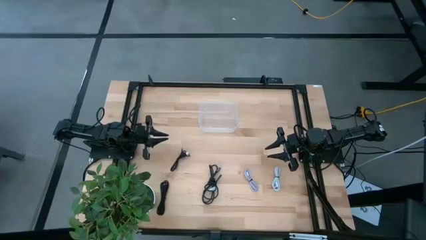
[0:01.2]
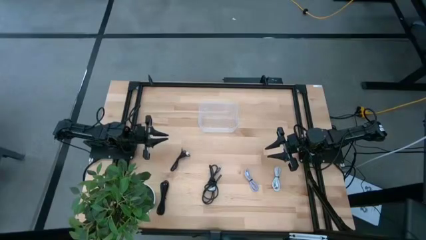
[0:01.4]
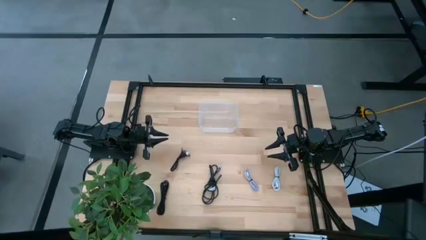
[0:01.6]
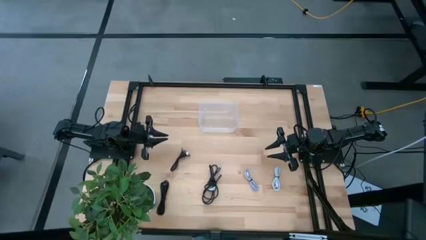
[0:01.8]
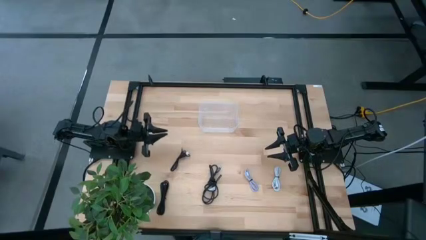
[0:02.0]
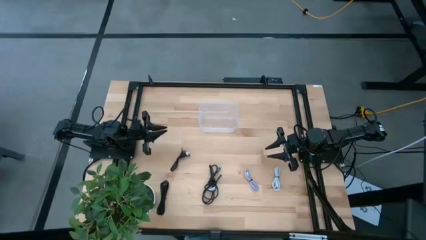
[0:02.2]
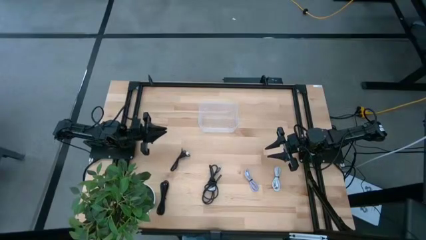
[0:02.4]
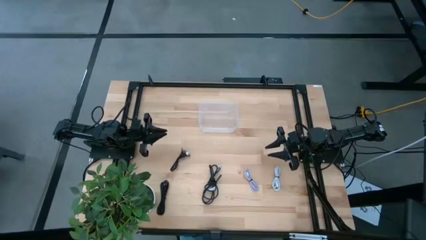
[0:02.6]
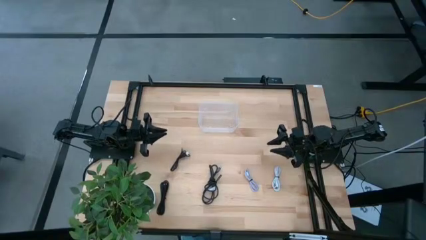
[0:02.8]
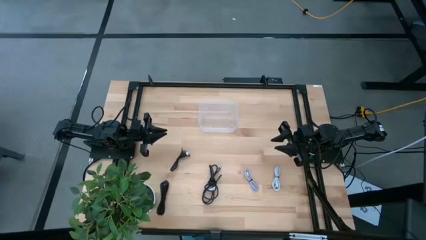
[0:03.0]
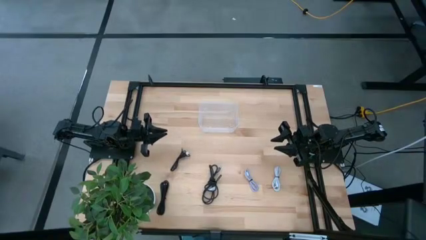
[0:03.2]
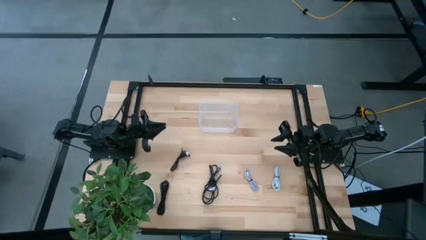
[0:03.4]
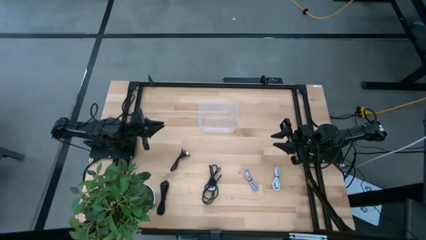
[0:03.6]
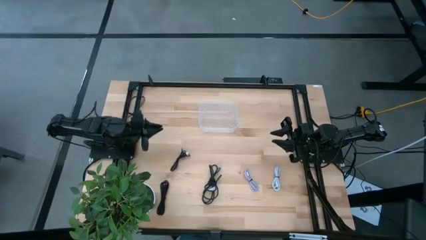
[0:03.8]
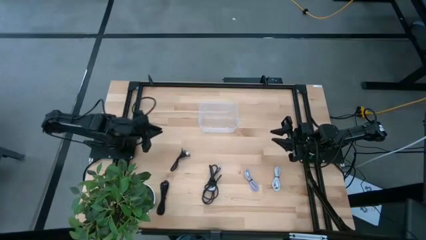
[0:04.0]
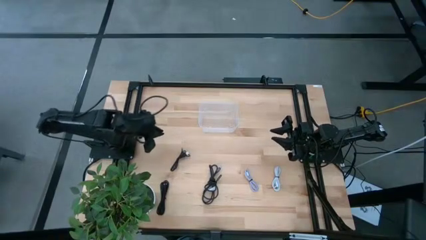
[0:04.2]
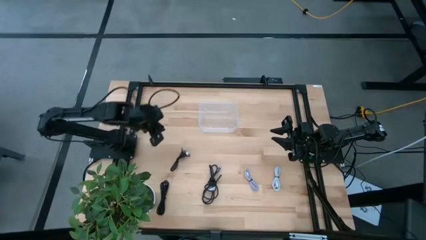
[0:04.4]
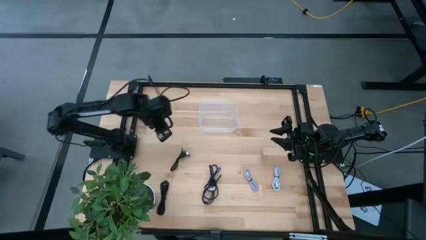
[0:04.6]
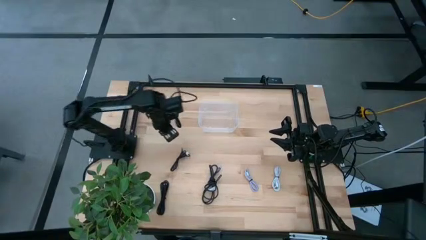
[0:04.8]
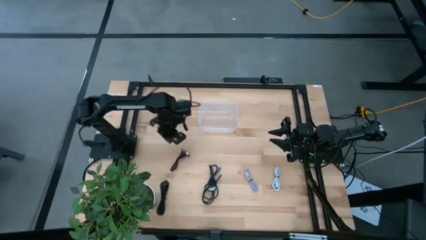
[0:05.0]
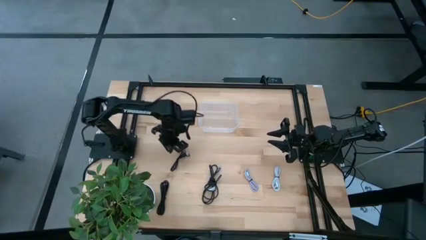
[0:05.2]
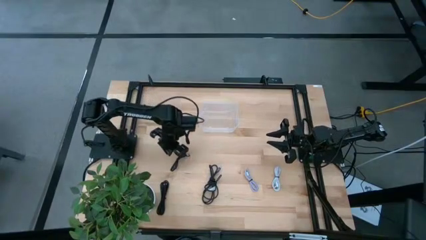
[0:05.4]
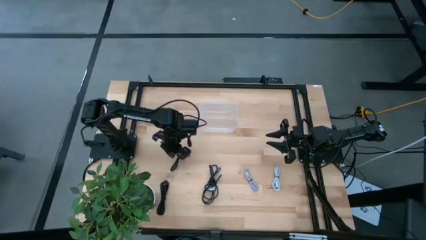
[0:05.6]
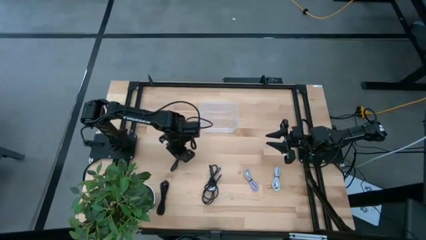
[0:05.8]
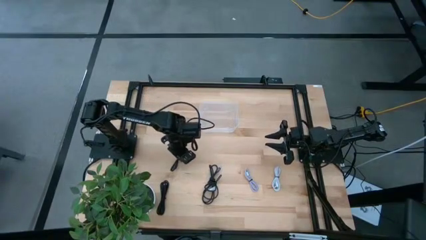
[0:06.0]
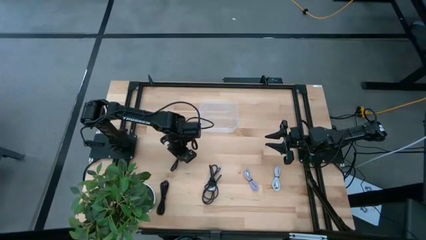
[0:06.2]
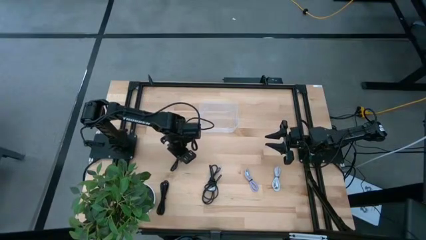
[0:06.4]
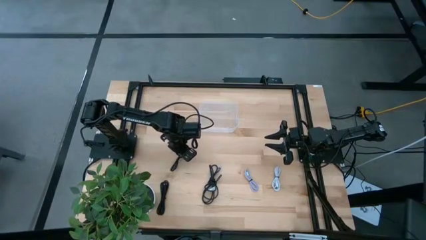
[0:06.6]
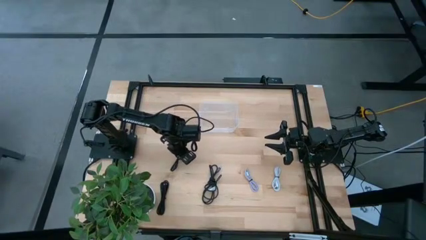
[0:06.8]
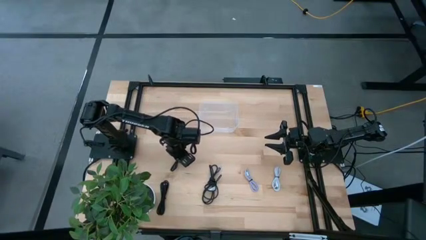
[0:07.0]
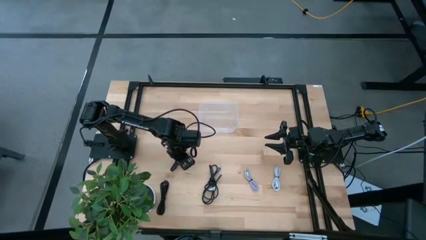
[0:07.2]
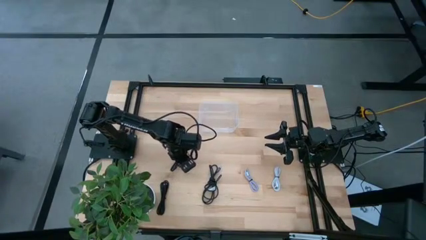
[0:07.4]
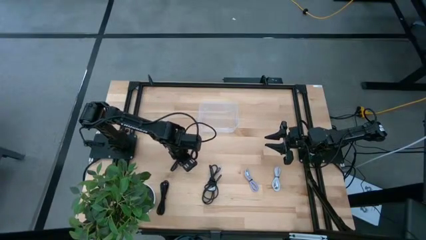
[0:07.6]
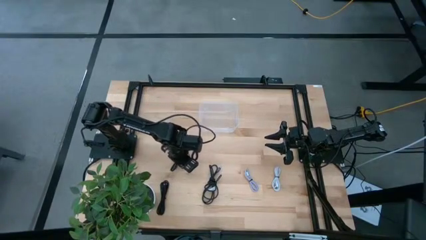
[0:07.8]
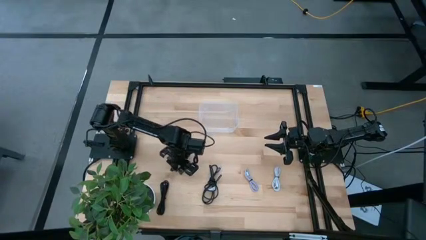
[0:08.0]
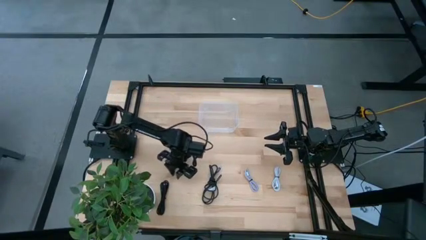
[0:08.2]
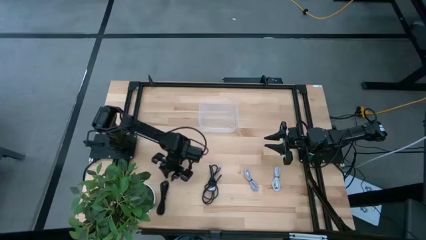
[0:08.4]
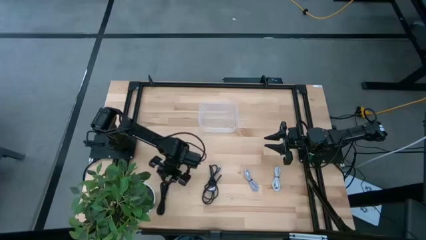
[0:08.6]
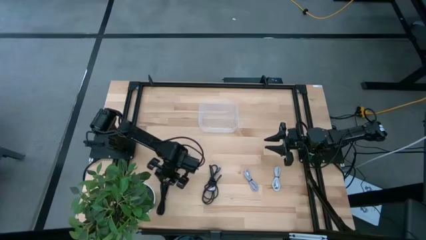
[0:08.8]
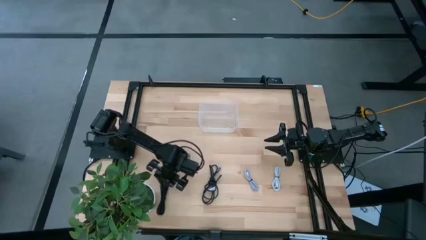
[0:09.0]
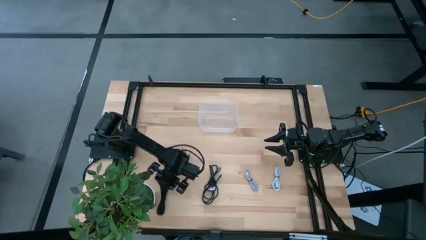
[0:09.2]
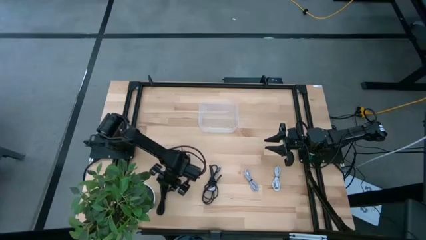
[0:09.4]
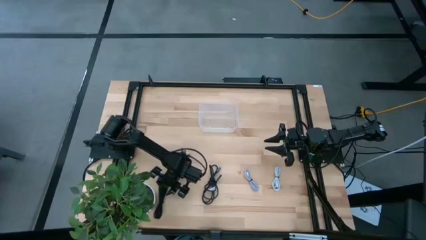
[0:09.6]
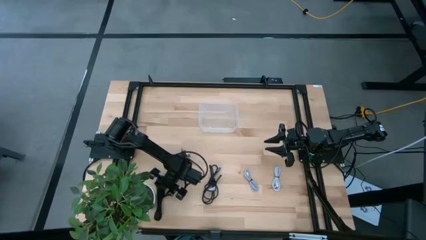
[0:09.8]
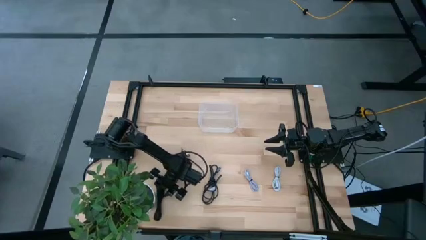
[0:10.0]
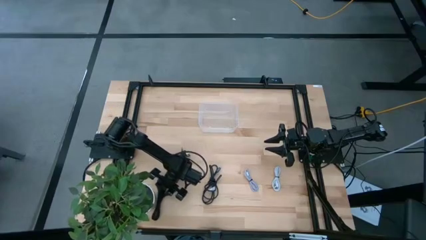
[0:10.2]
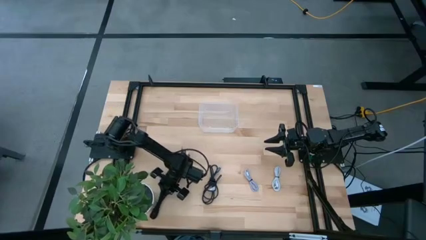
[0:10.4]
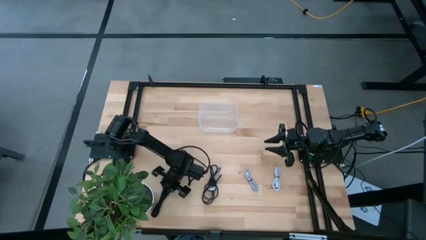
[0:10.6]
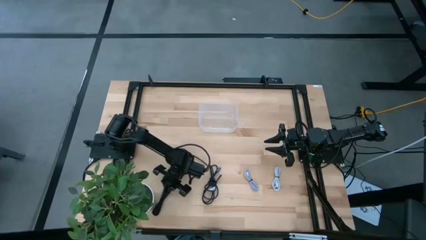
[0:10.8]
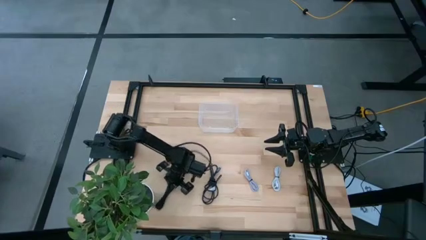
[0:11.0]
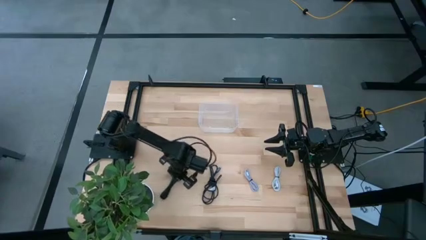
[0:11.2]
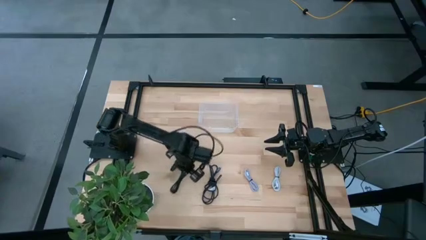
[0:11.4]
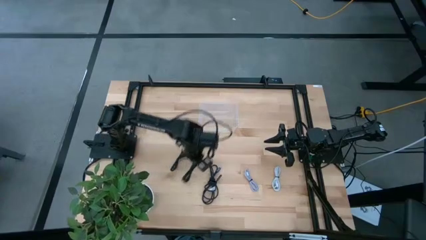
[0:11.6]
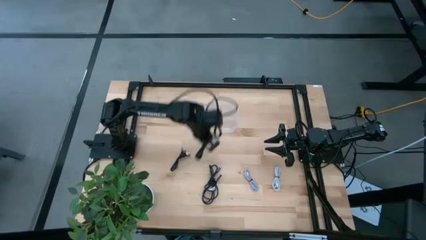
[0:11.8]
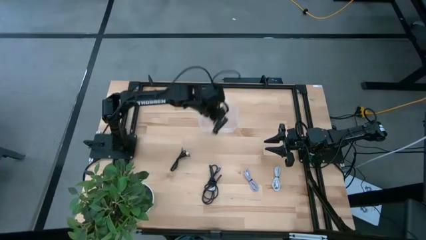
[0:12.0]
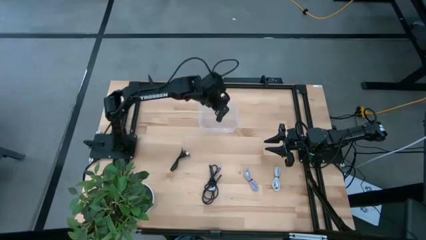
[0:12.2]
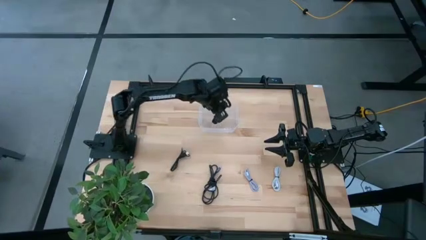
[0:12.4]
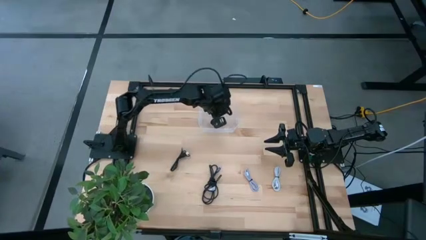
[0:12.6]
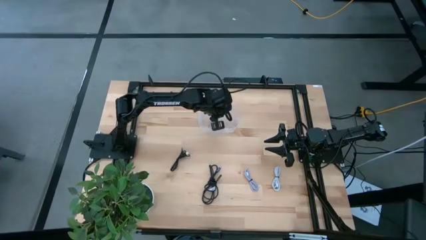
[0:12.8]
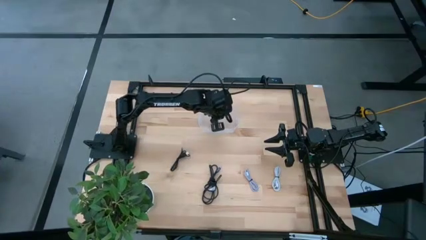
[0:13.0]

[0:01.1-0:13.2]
Task: Pick and place USB-C Cables
Put the bottom black charger cable into the transparent bin

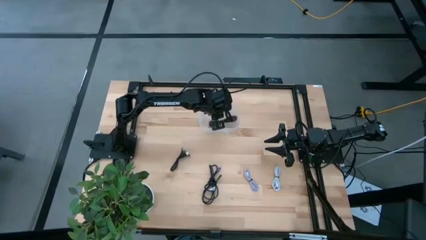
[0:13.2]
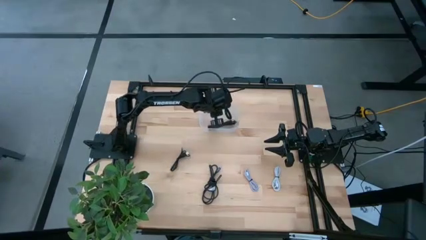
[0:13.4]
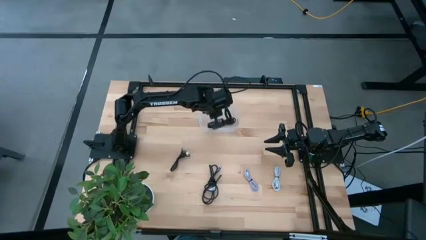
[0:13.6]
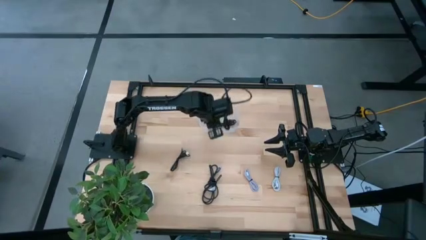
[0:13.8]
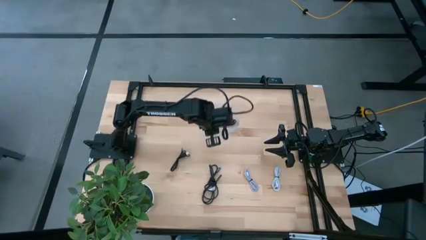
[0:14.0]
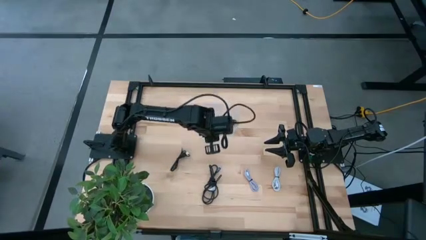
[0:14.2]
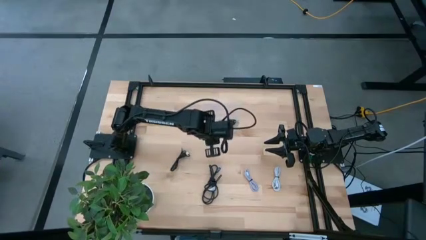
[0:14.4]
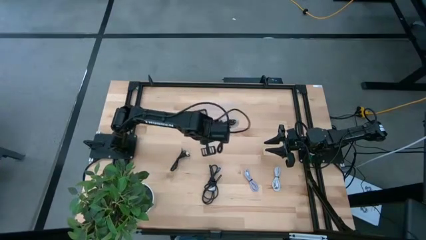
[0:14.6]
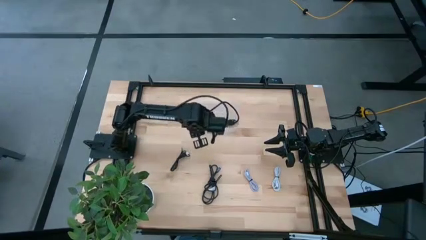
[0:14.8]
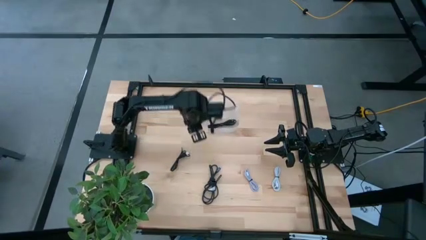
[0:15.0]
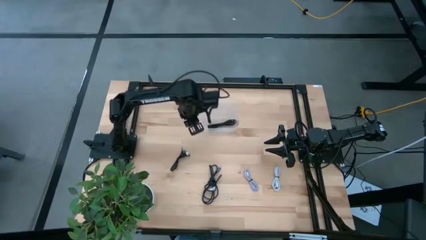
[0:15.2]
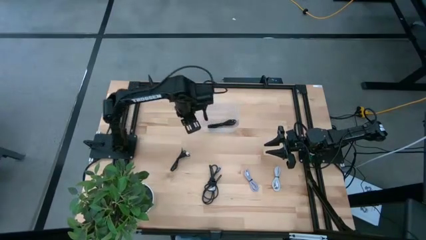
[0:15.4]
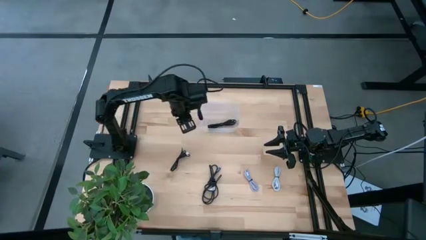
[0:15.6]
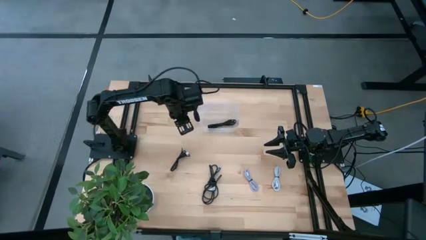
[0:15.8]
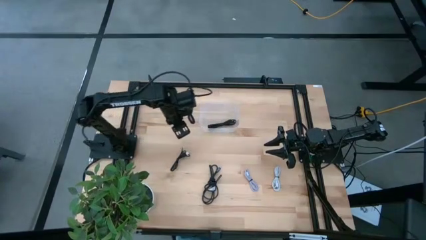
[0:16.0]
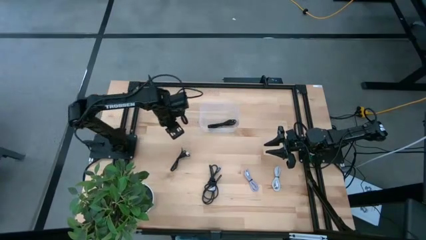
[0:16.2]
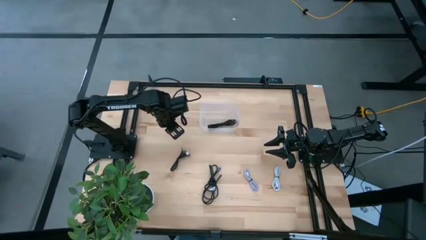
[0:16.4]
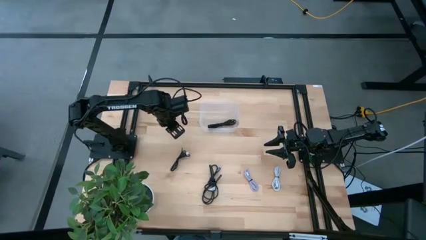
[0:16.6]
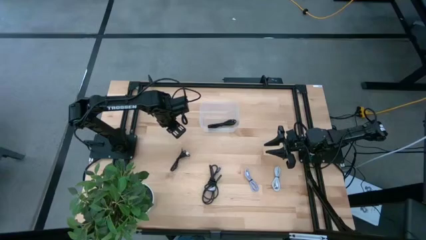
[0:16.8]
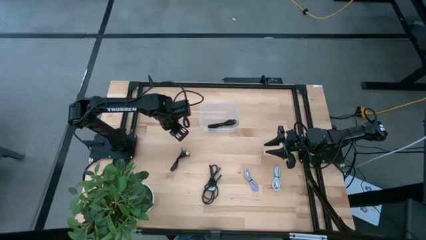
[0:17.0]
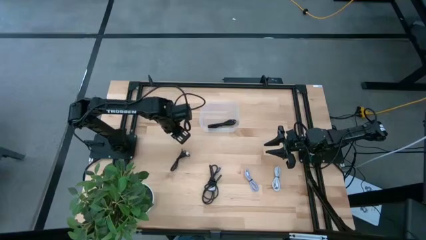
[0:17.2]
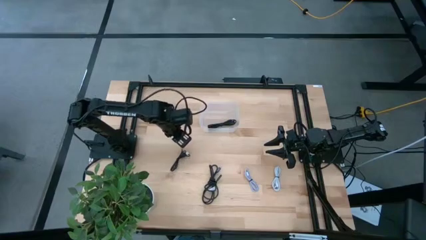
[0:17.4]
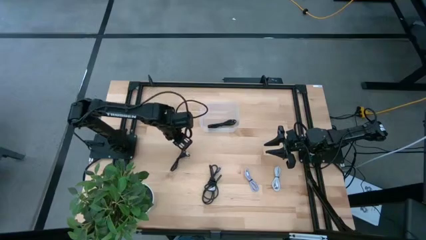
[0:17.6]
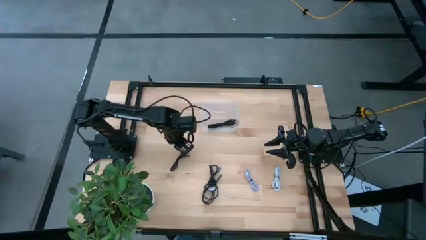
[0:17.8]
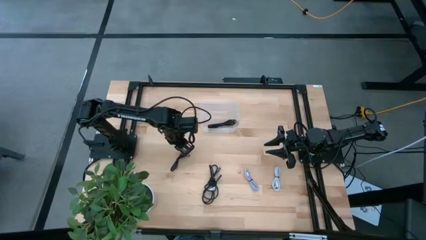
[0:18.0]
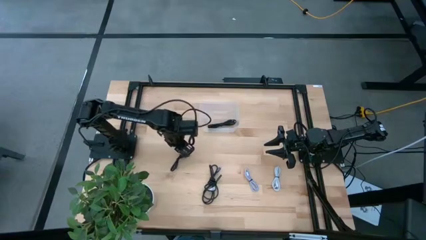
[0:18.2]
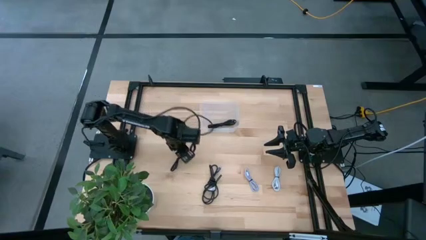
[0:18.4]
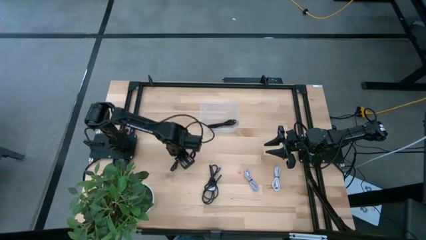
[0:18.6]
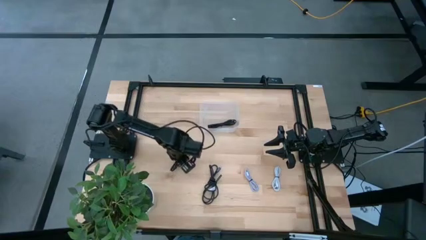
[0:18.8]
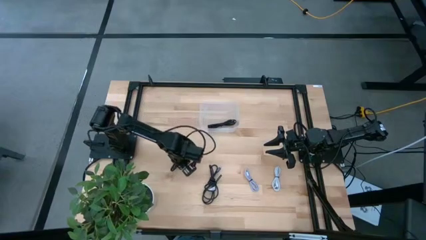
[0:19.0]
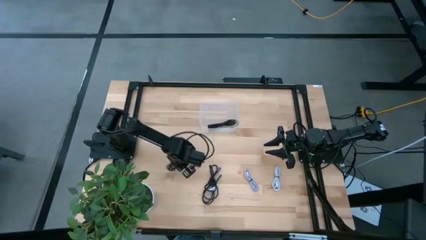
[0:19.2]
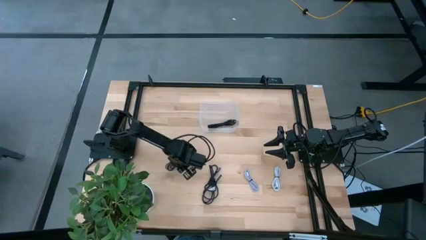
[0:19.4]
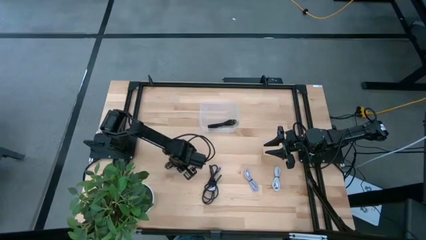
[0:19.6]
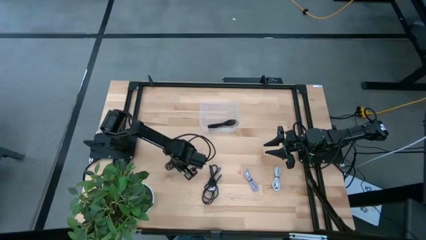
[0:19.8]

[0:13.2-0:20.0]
Put the top black charger cable into the transparent bin
